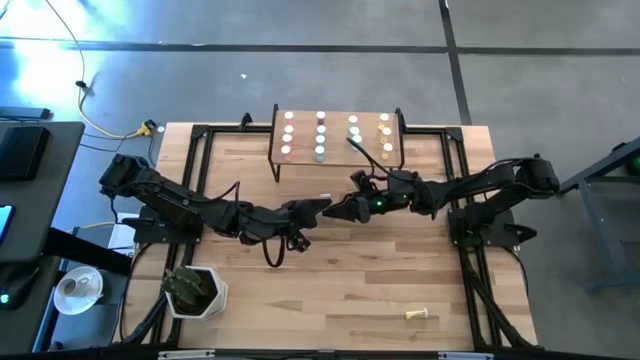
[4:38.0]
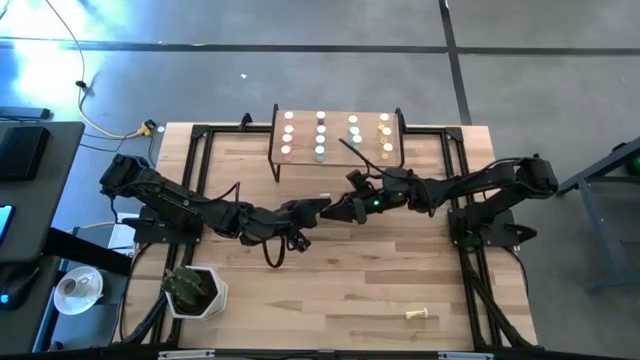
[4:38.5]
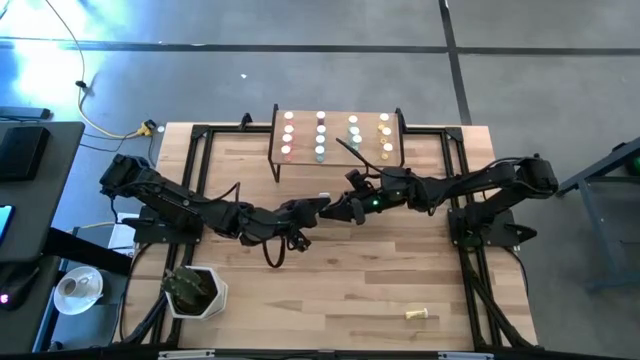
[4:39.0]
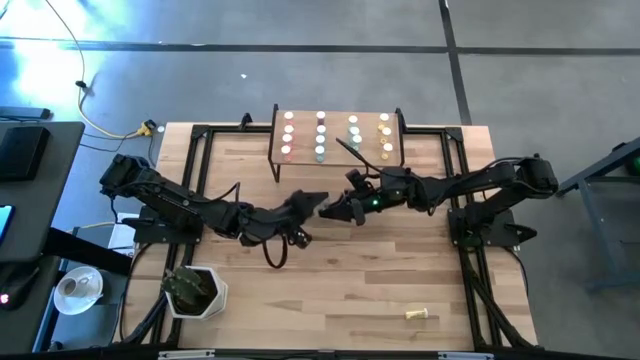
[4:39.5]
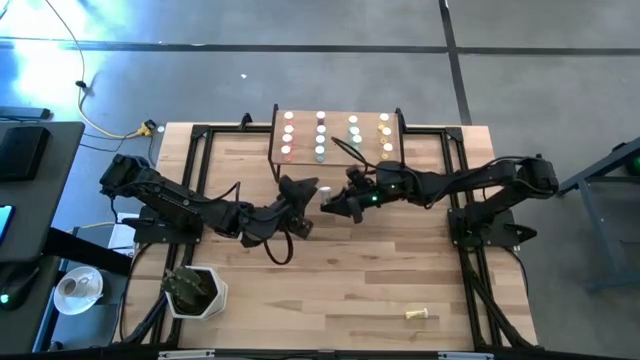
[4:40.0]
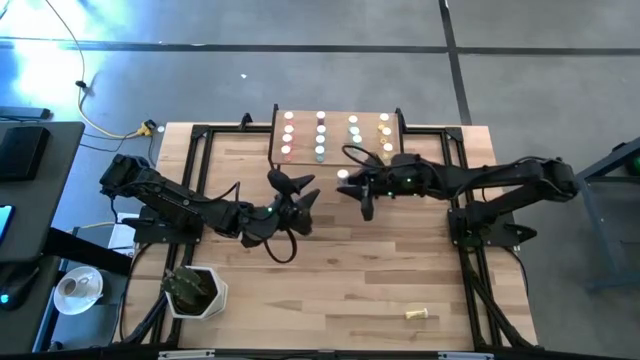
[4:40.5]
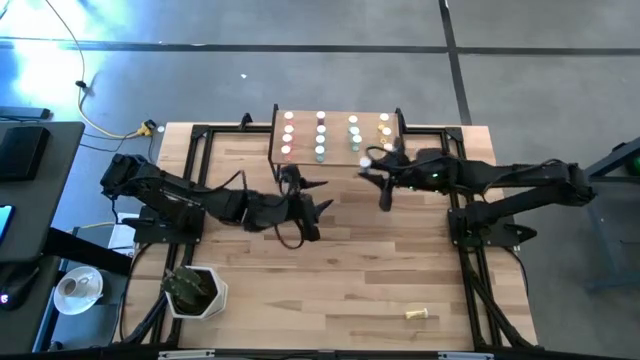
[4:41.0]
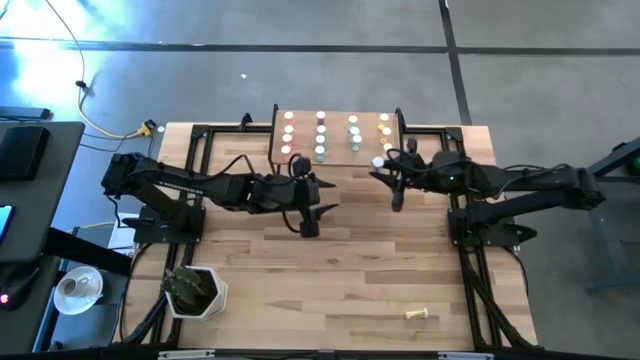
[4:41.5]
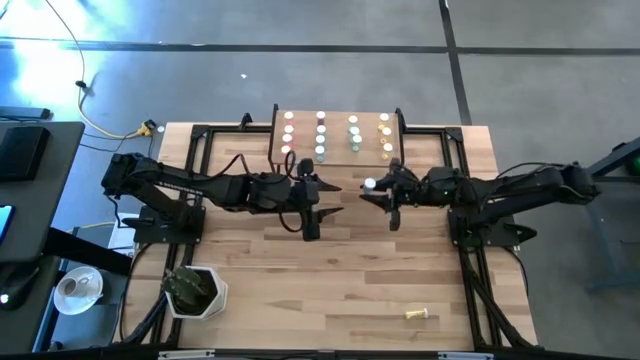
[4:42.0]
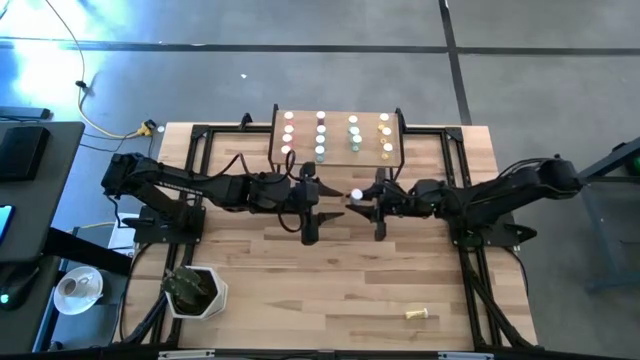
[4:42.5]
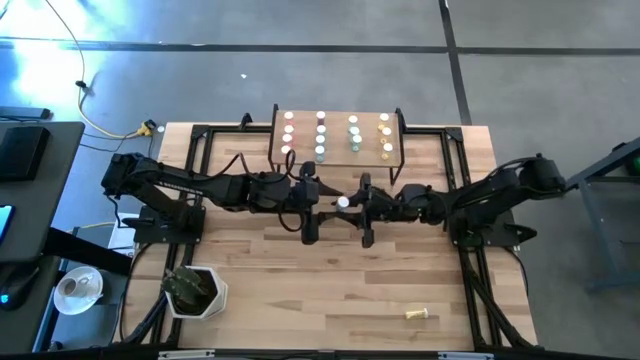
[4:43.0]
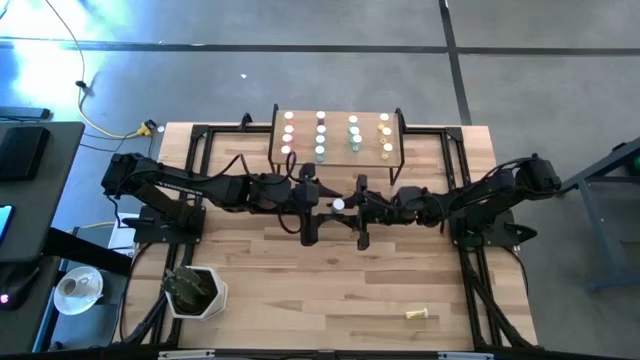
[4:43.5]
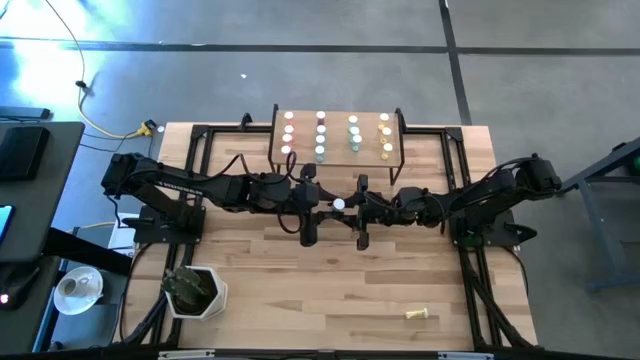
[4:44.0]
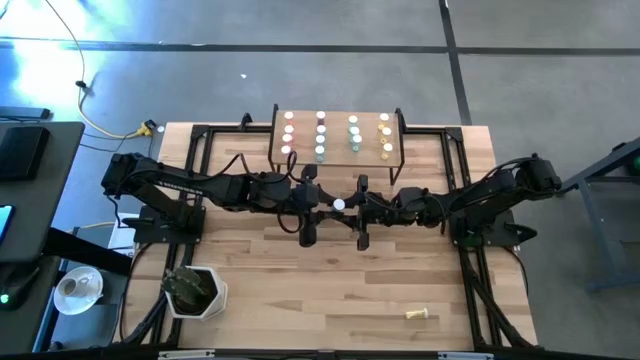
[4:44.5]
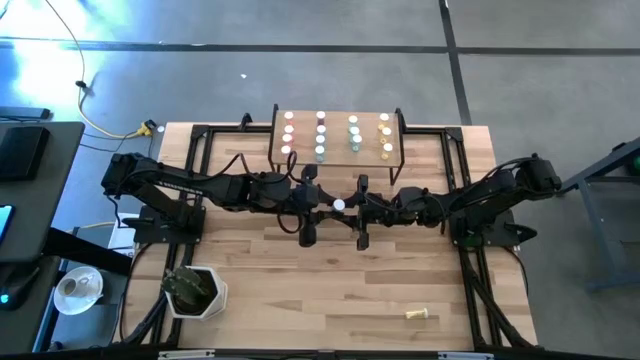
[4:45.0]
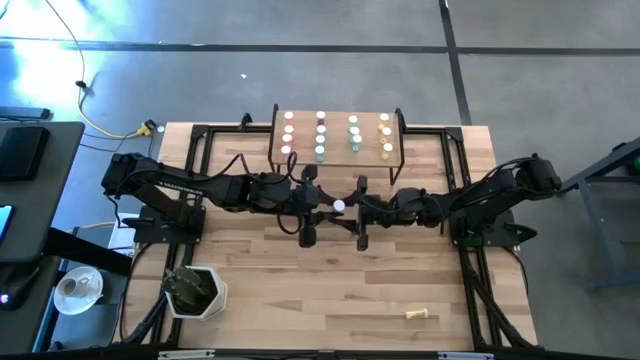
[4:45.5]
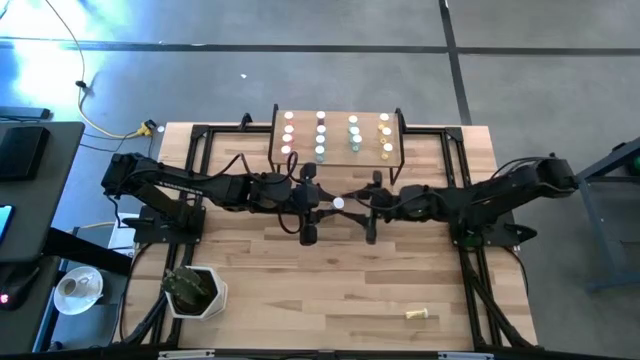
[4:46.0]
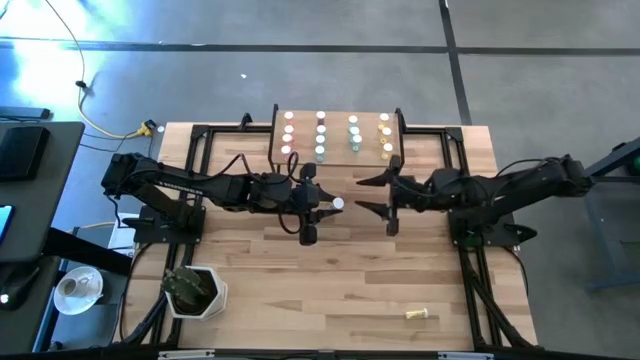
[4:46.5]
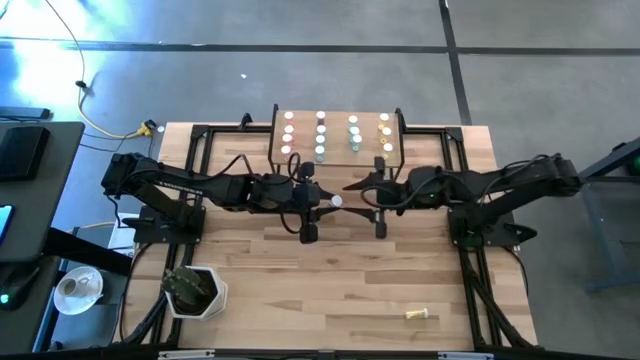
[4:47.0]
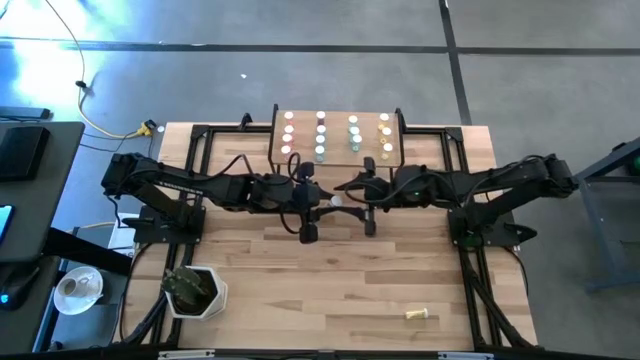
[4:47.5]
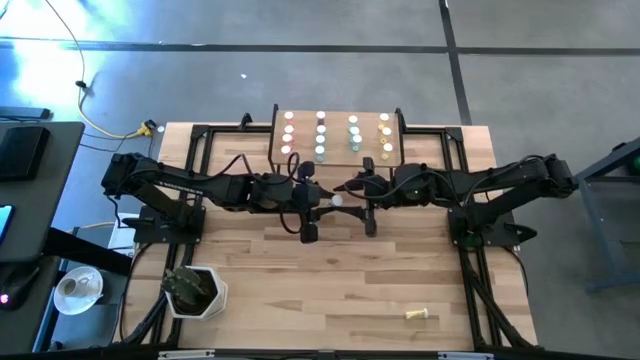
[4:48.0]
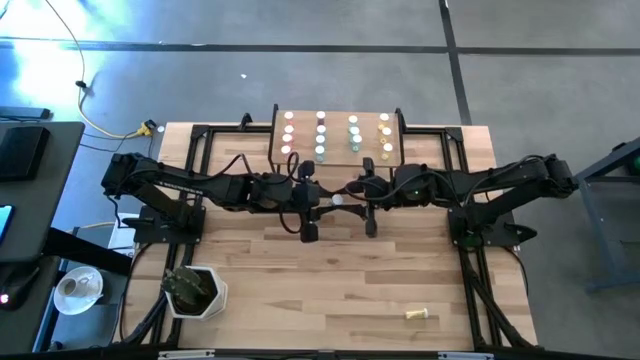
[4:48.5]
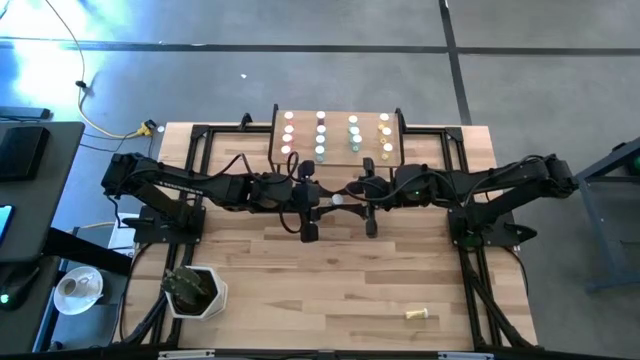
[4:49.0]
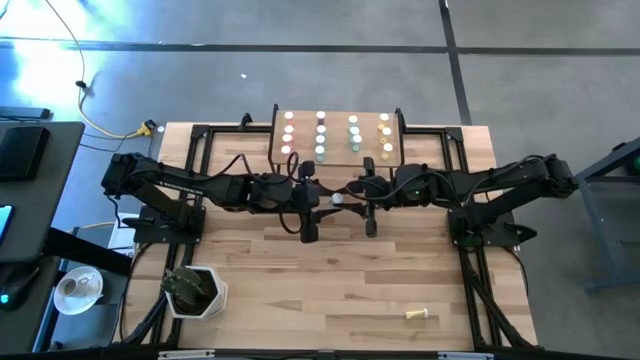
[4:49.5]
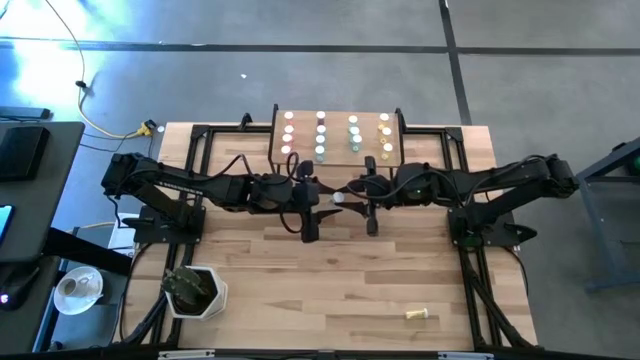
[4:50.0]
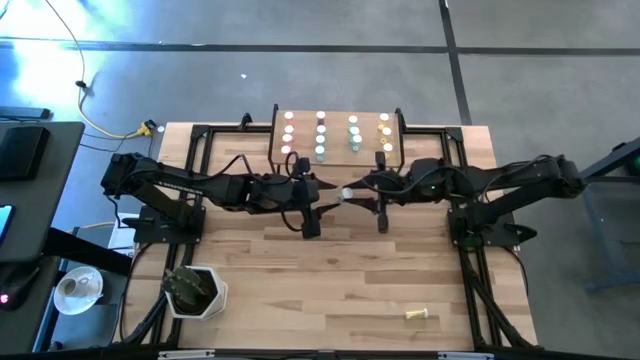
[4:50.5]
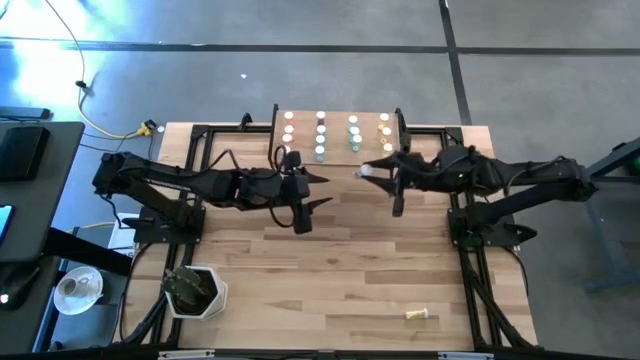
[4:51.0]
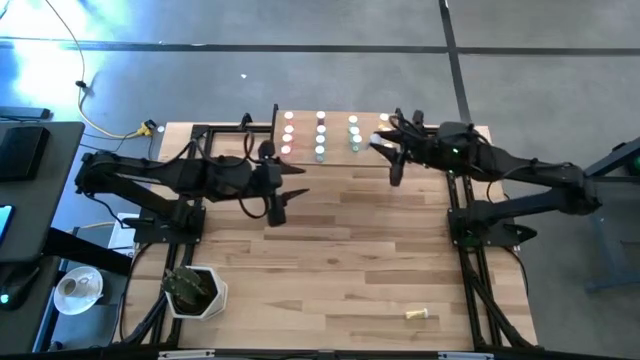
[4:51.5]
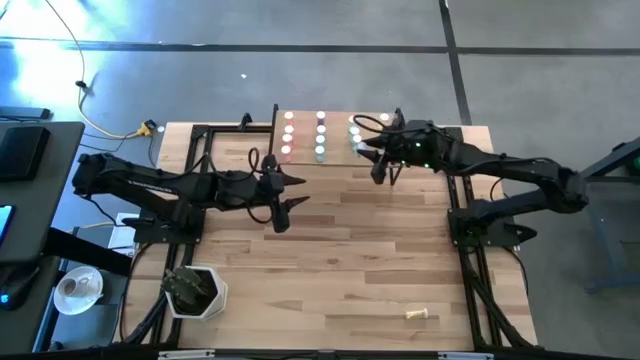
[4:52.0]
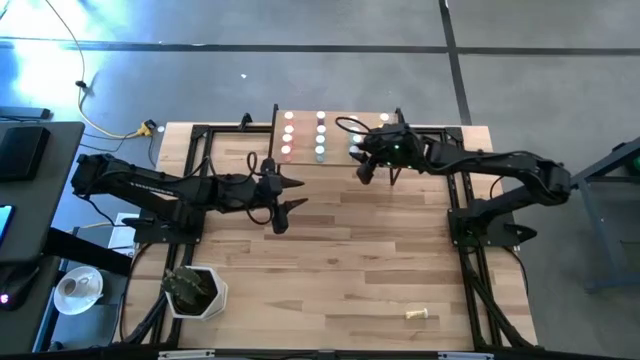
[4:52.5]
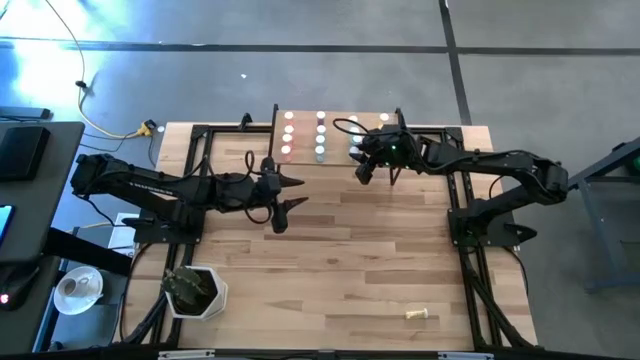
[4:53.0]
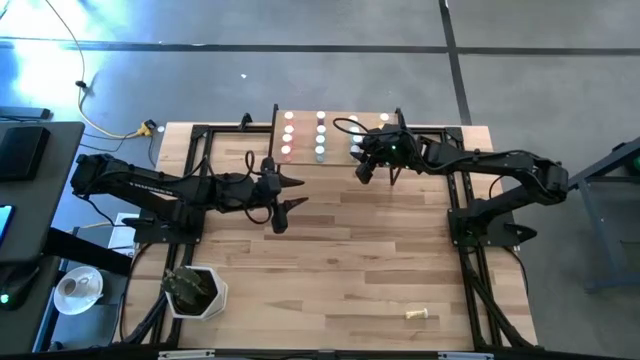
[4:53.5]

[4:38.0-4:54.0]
Task: Pick and place medicine bottles onto shelf by color
Put the green pill bottle on the shelf aligned with the other green pill bottles

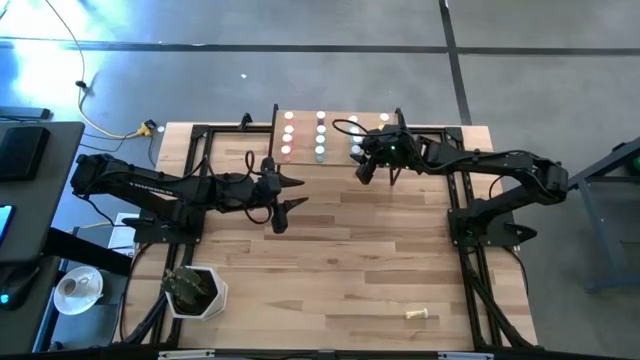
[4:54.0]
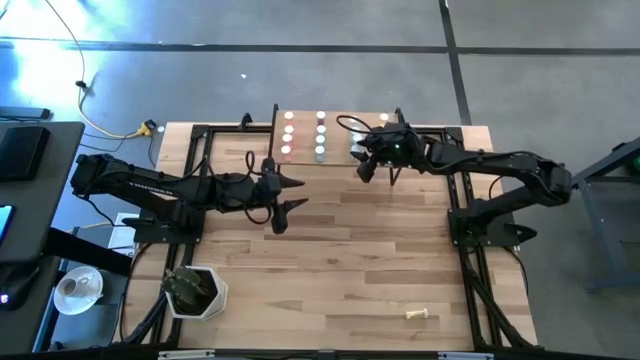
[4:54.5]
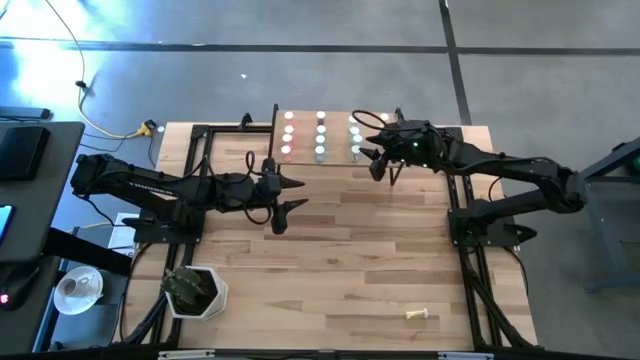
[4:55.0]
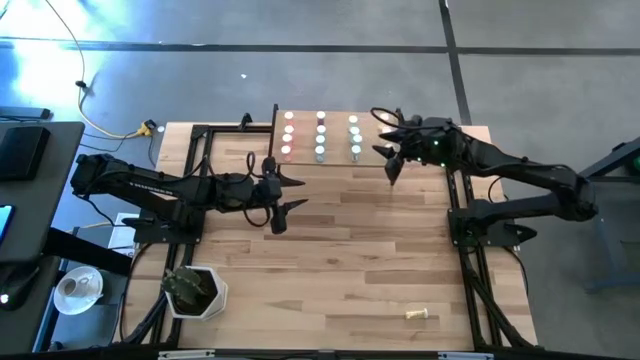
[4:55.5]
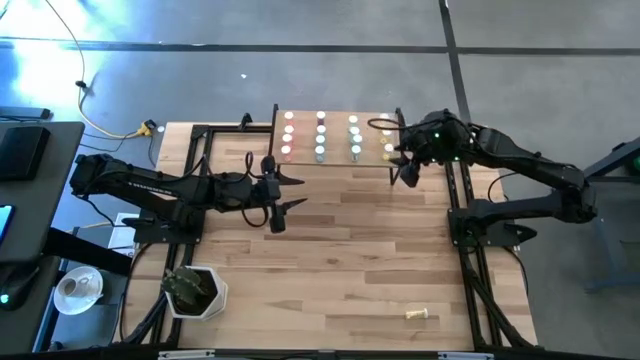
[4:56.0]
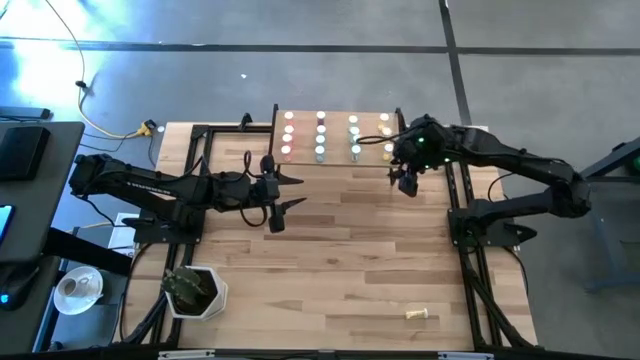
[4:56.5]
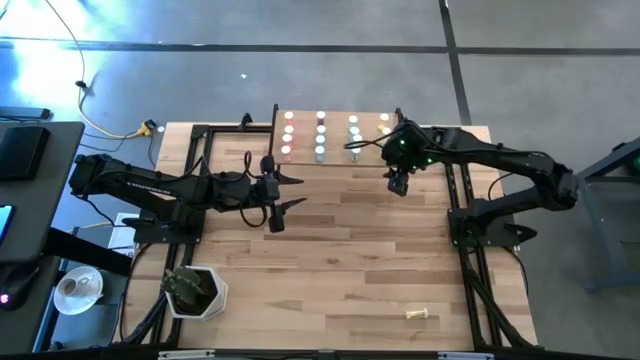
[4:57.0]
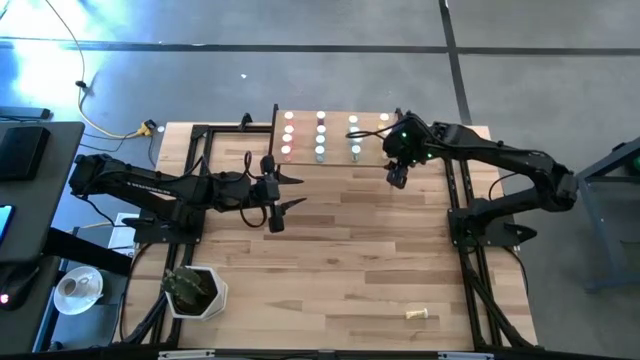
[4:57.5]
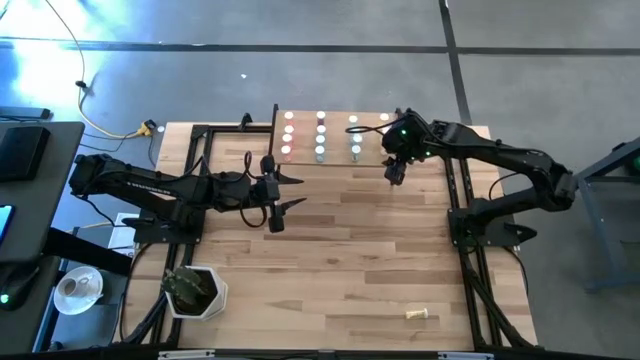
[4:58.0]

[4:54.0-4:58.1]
Adjust the yellow pill bottle on the shelf
